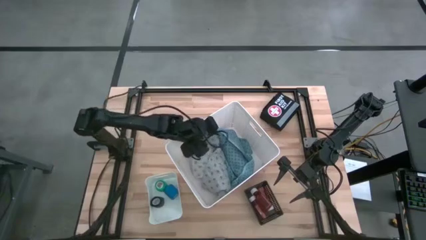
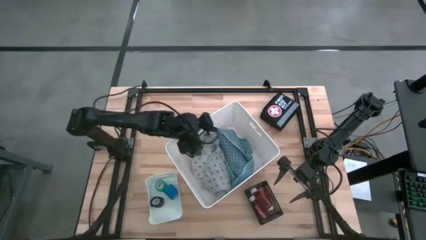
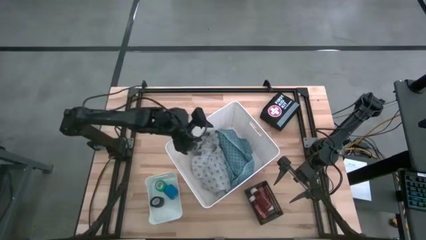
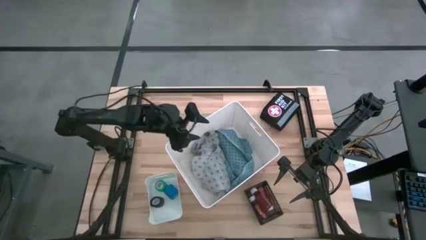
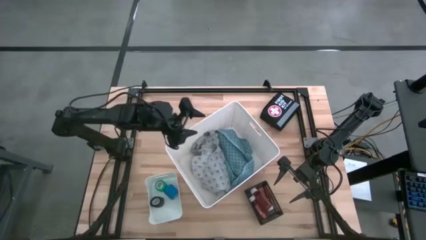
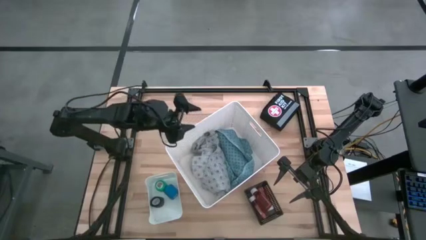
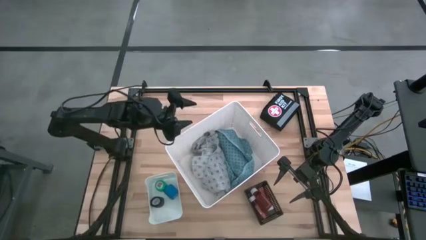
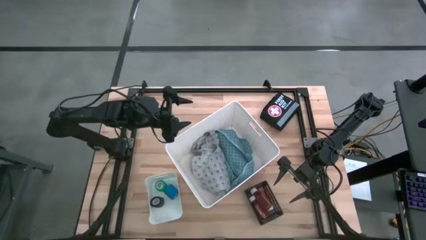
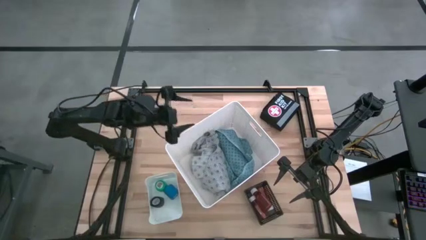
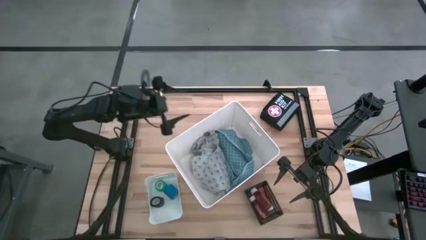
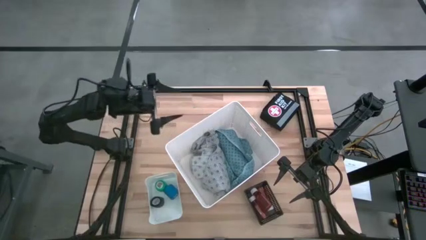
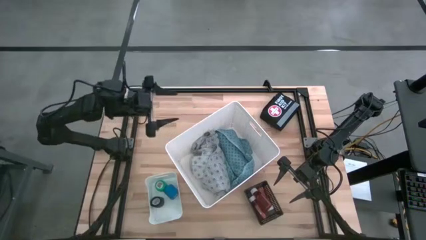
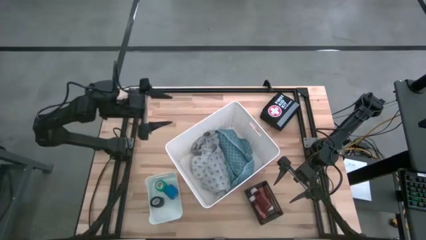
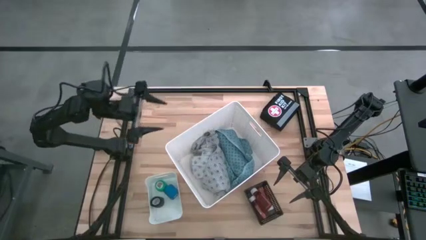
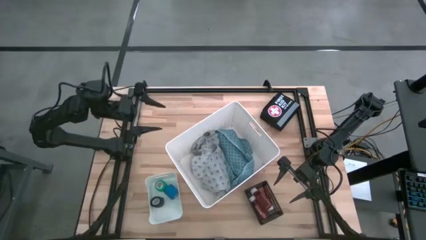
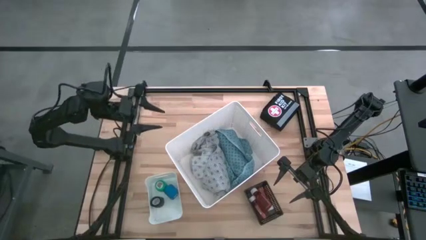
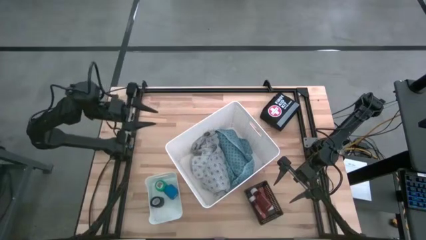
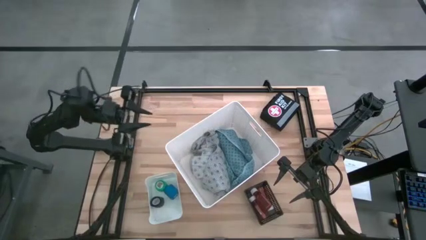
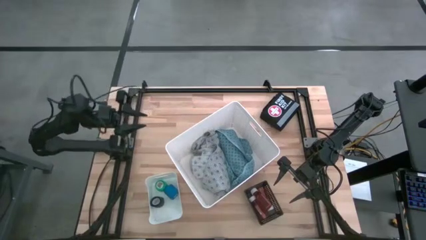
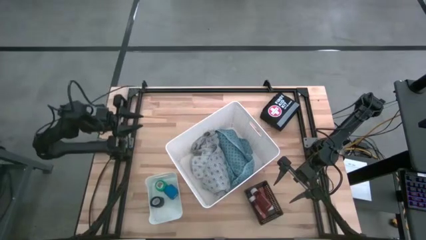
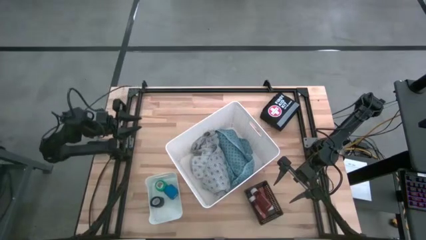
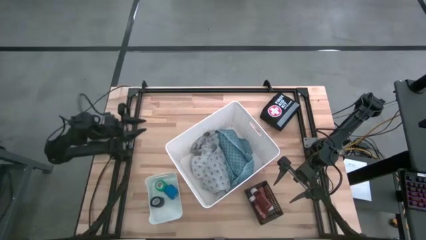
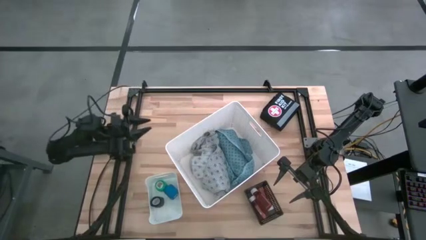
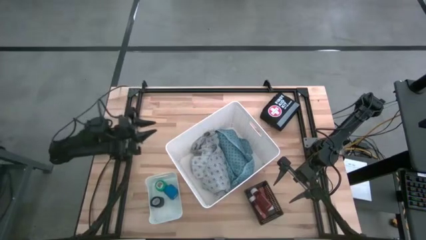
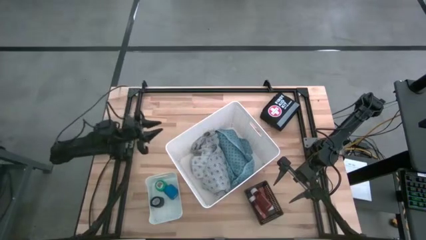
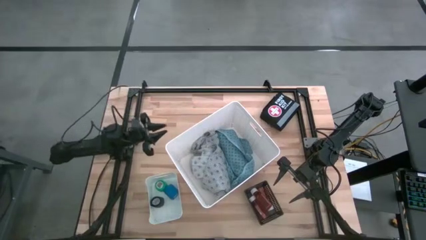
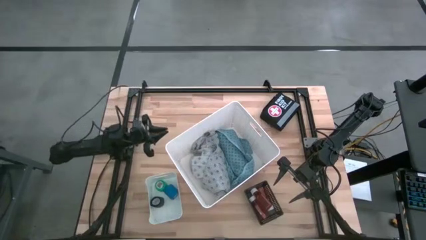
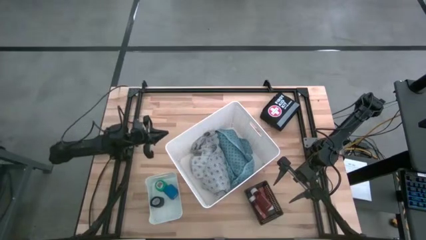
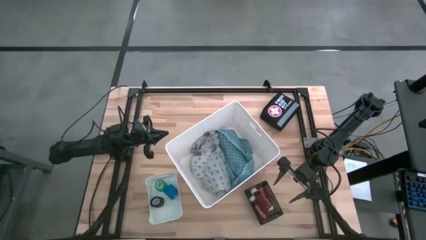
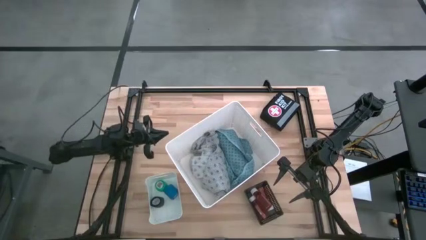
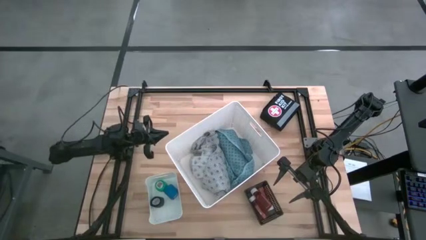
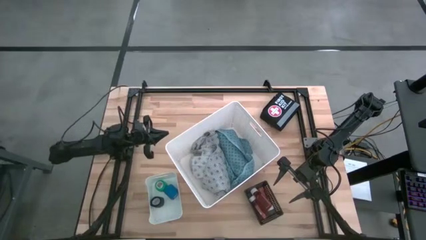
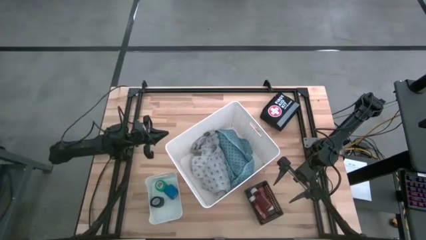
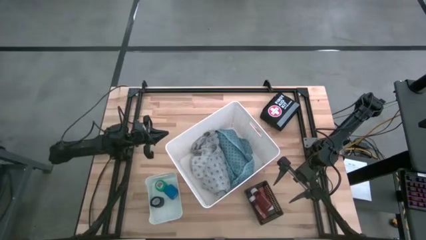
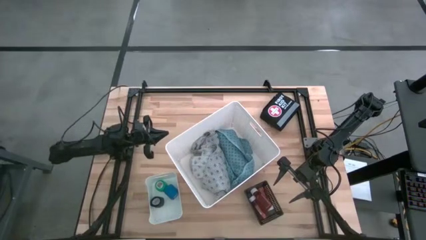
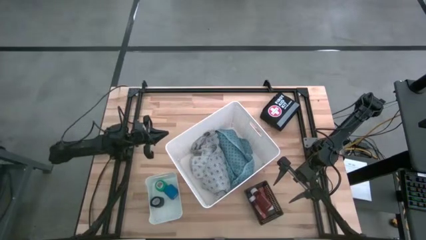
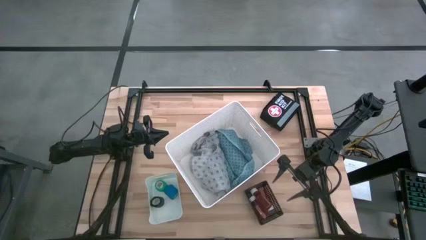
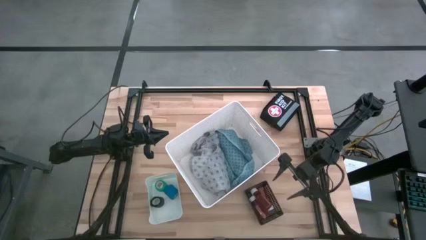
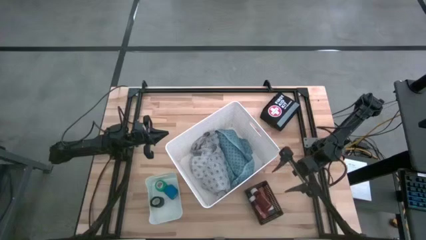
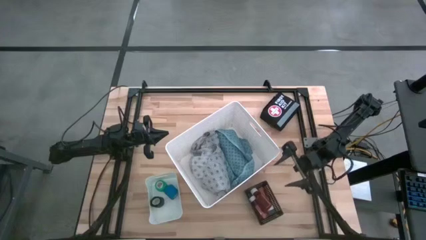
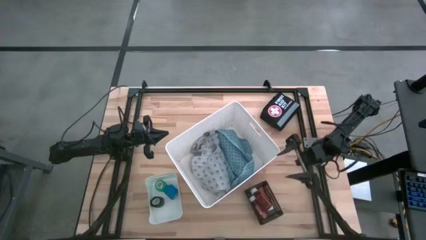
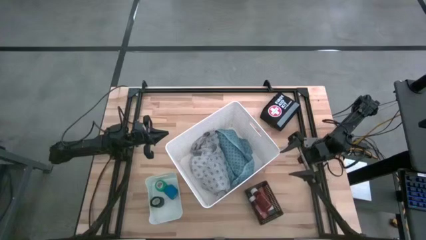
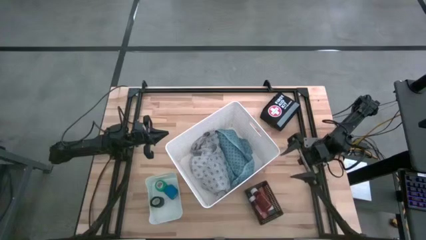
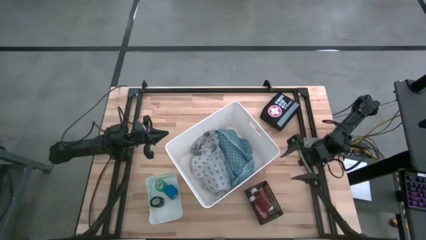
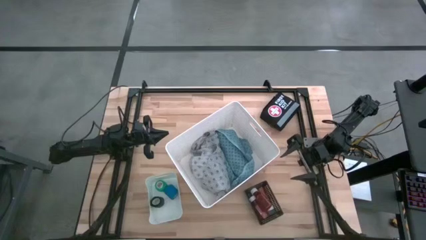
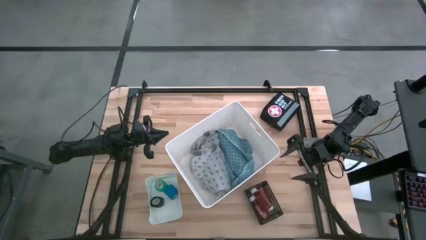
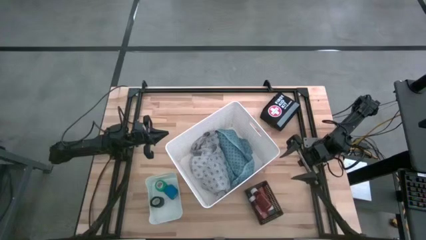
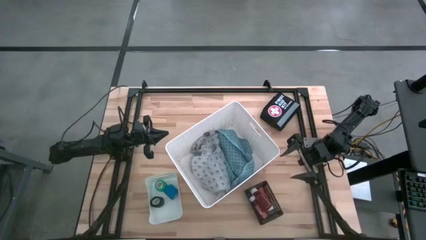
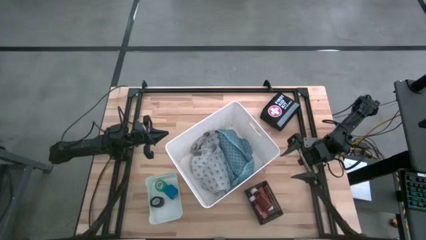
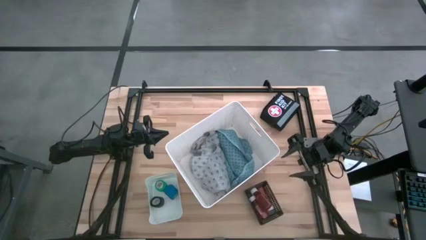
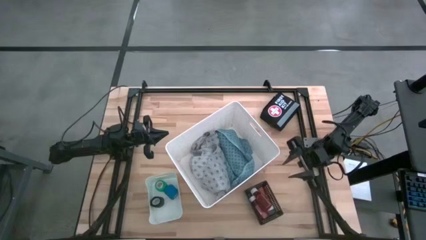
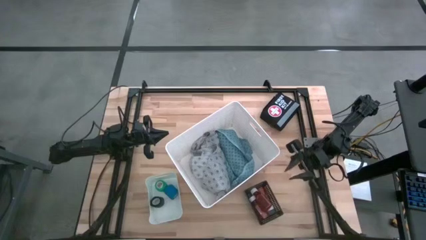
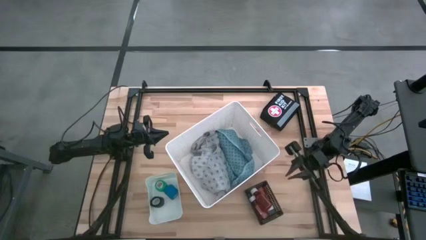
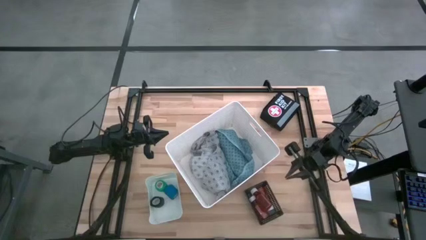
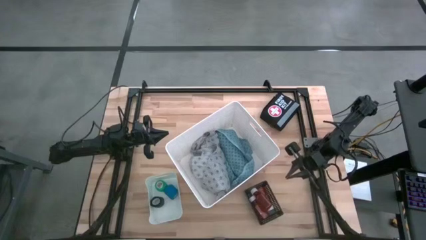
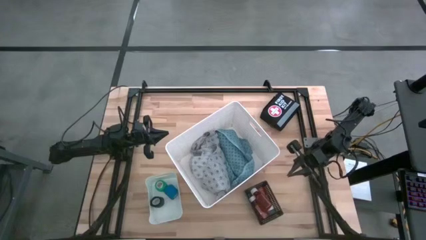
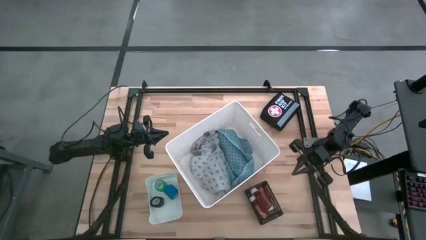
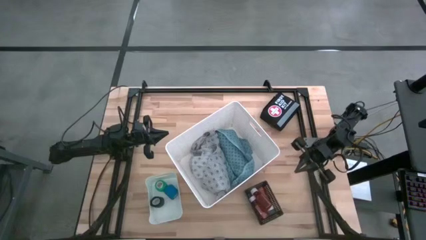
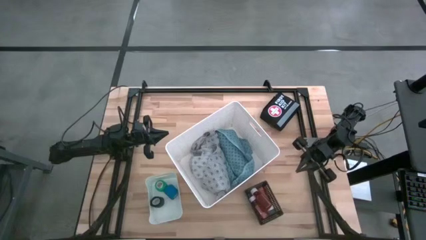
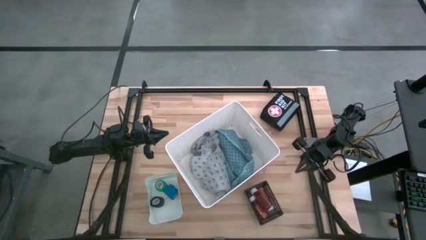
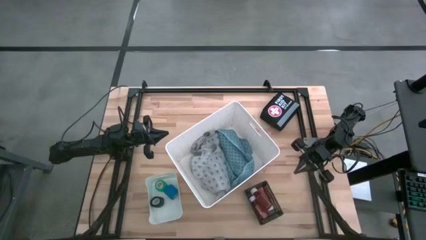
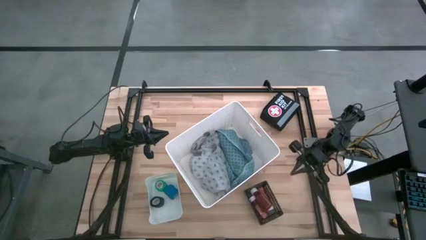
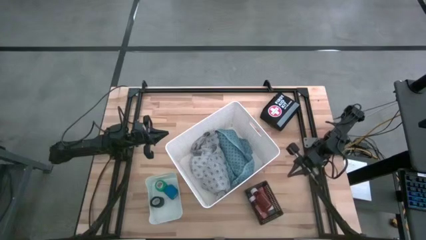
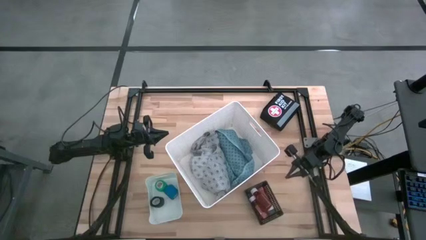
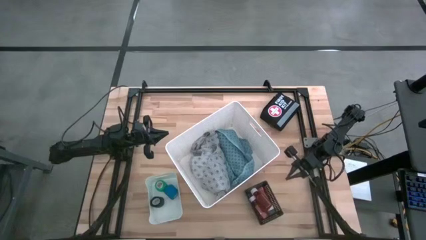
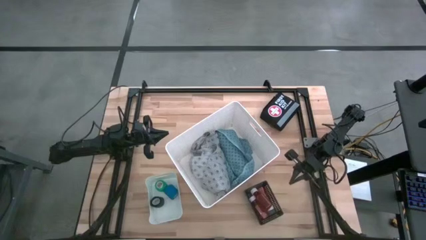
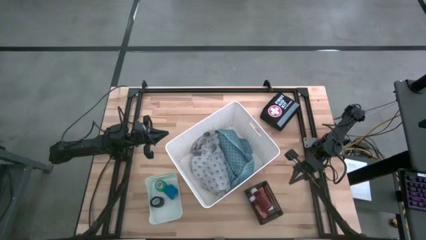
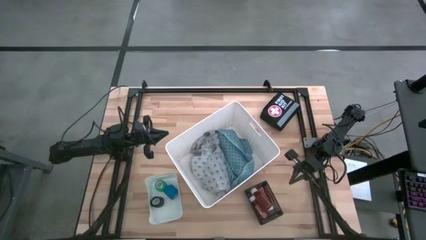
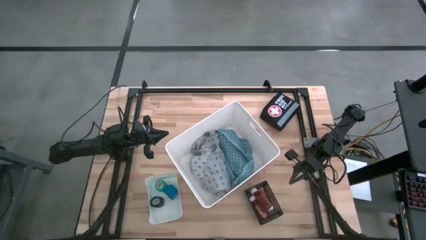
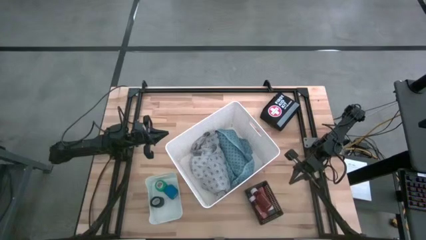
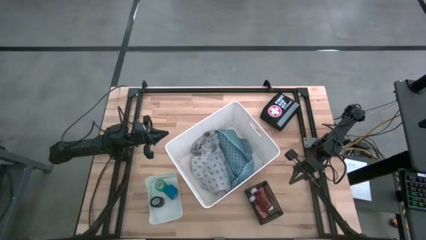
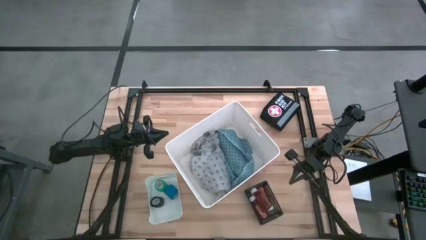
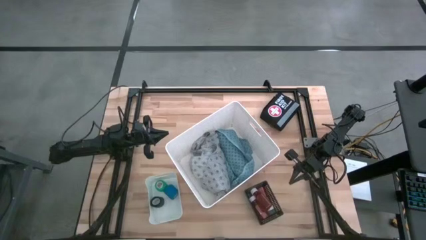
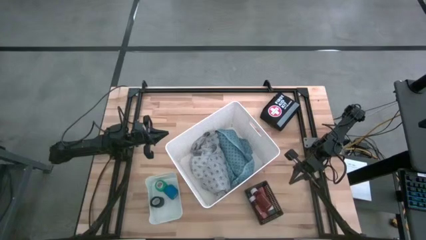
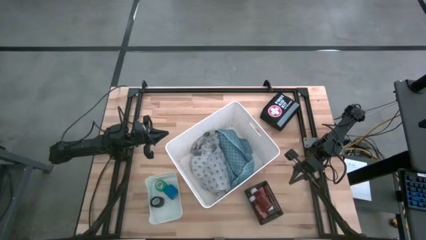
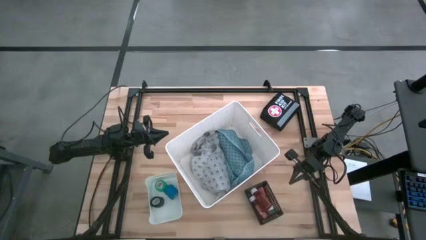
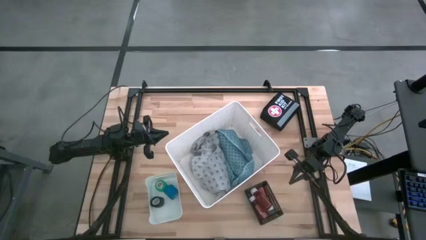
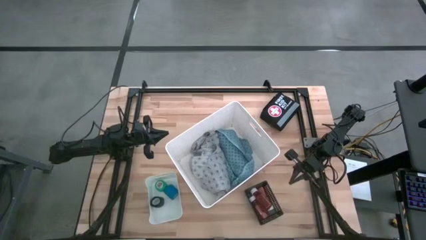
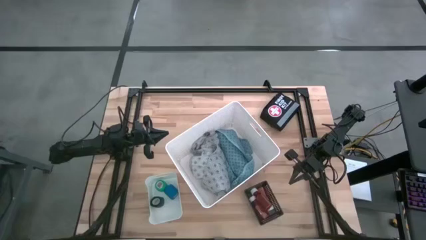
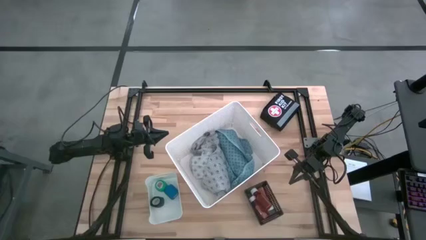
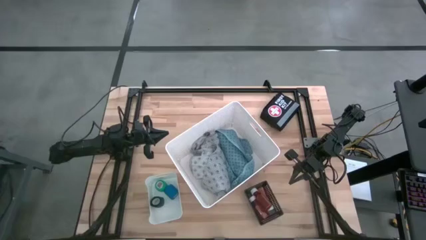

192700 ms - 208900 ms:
Task: Pick & place medical supplies in basket/bin
Return to Home Position
